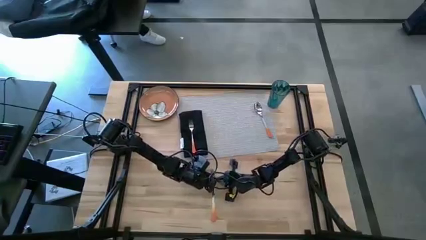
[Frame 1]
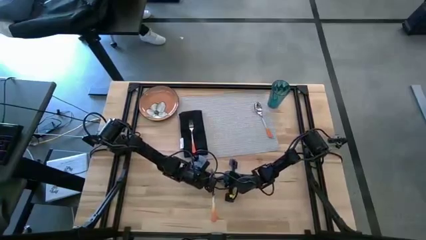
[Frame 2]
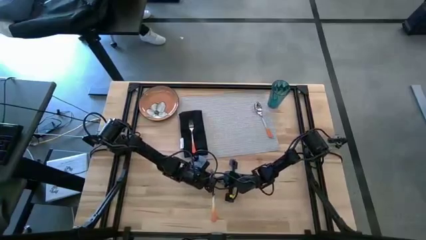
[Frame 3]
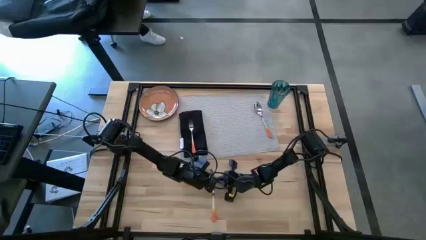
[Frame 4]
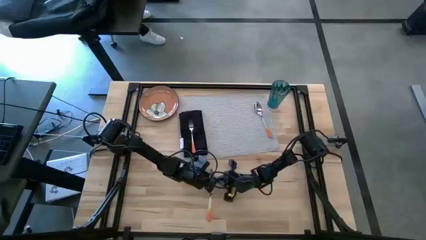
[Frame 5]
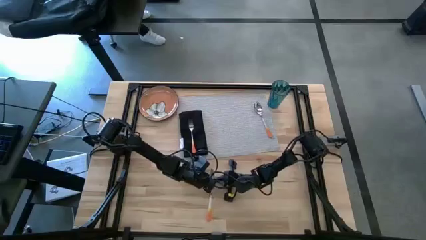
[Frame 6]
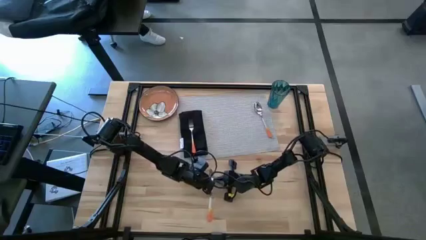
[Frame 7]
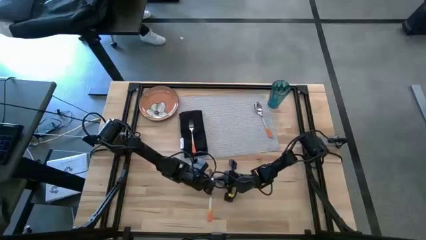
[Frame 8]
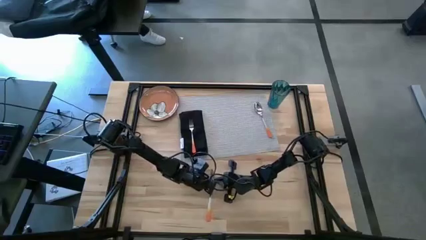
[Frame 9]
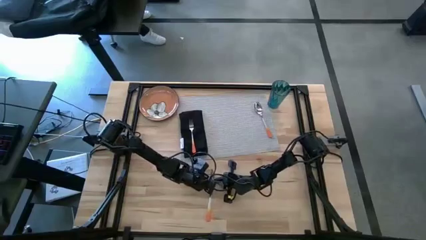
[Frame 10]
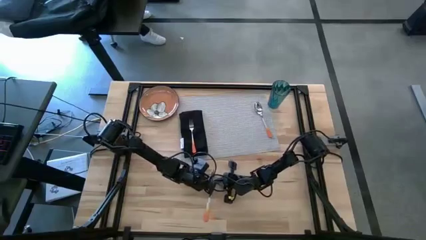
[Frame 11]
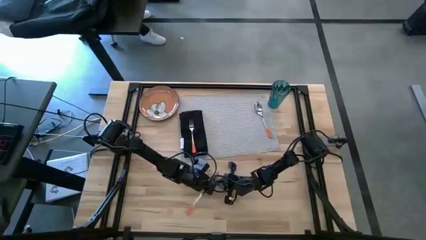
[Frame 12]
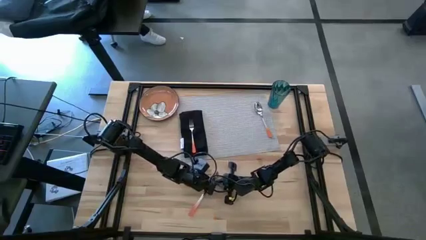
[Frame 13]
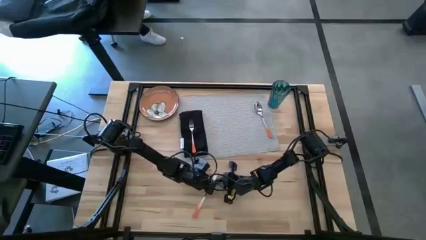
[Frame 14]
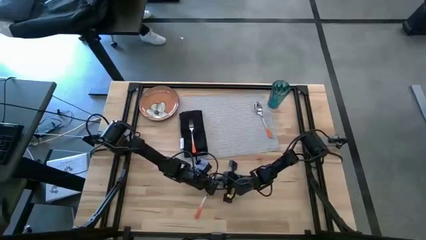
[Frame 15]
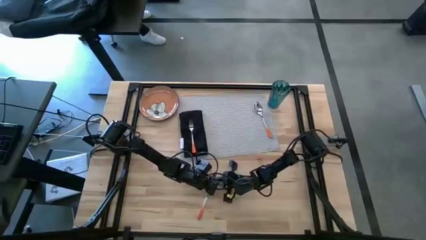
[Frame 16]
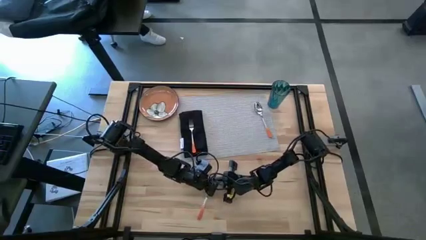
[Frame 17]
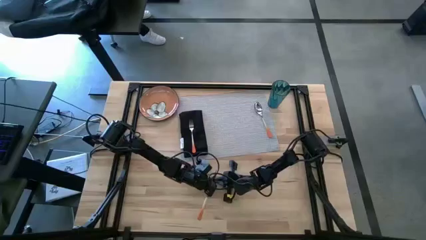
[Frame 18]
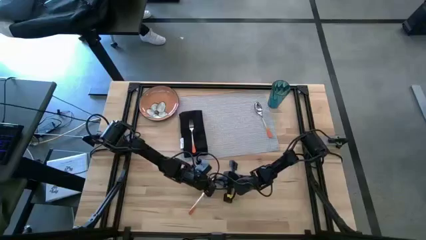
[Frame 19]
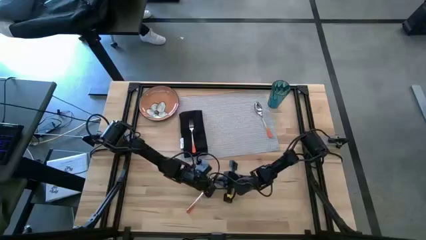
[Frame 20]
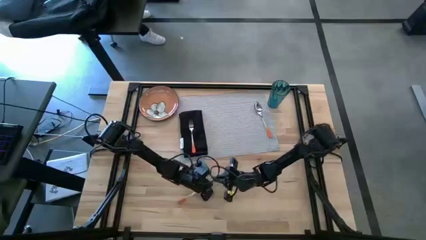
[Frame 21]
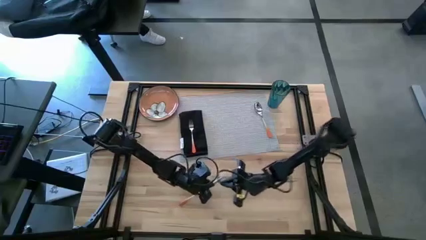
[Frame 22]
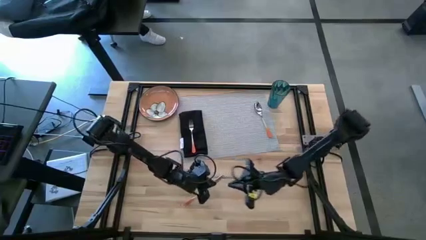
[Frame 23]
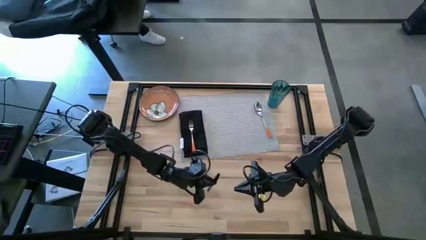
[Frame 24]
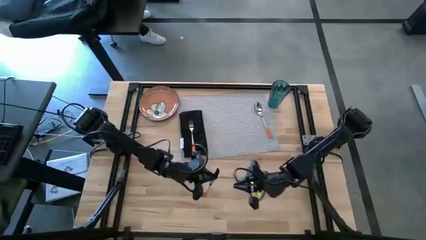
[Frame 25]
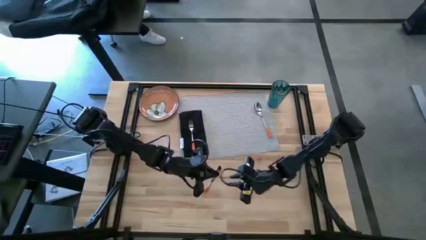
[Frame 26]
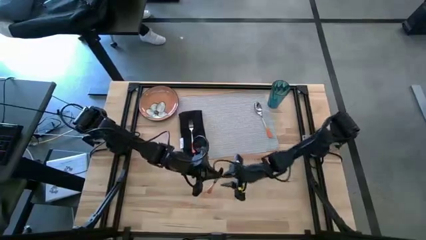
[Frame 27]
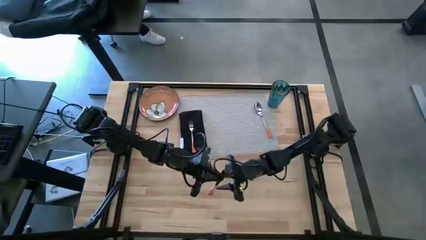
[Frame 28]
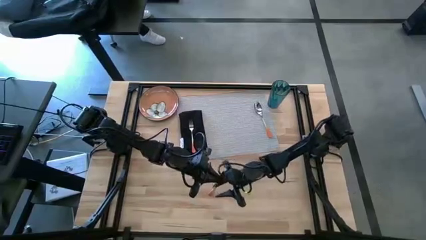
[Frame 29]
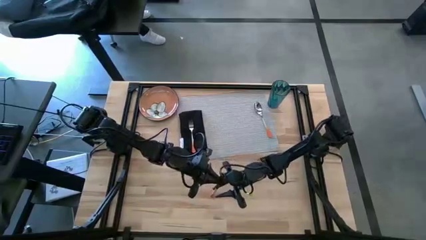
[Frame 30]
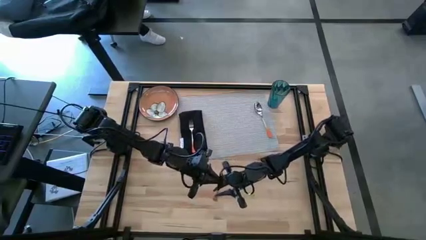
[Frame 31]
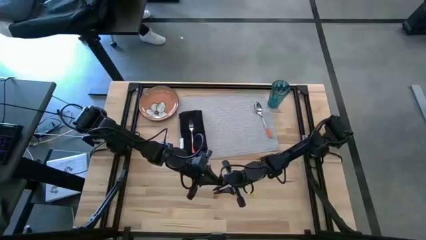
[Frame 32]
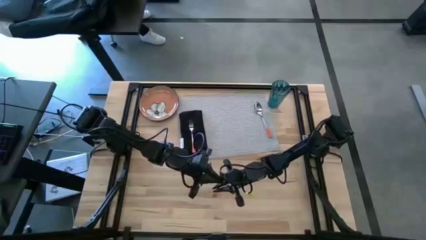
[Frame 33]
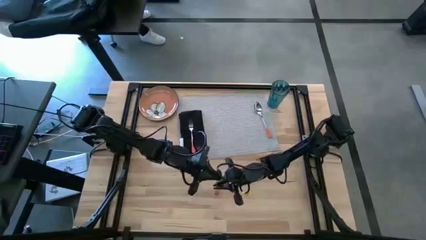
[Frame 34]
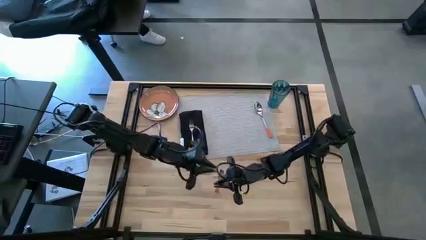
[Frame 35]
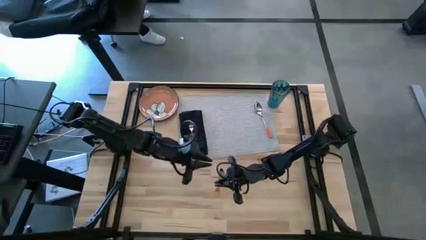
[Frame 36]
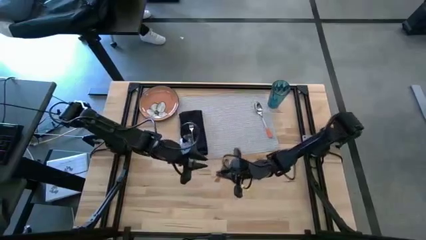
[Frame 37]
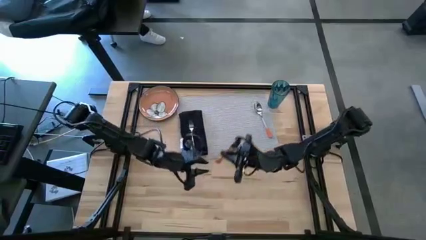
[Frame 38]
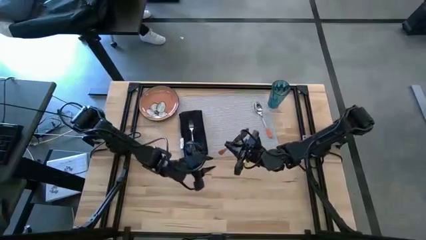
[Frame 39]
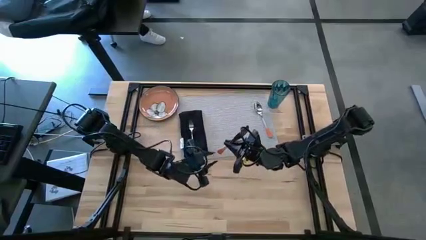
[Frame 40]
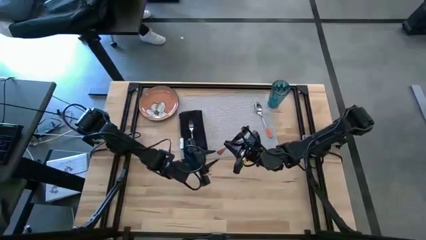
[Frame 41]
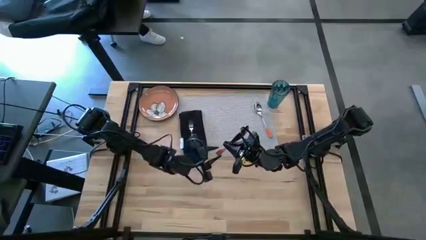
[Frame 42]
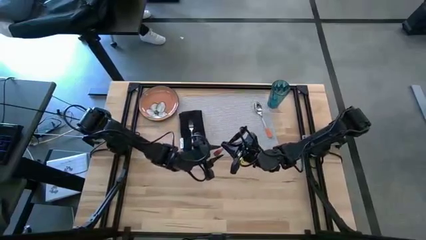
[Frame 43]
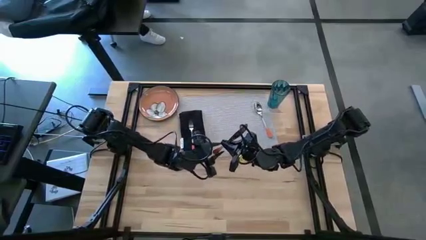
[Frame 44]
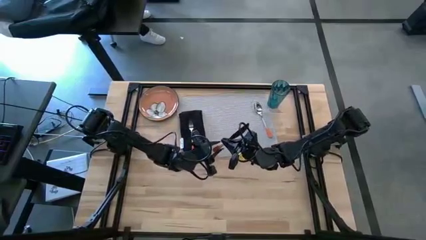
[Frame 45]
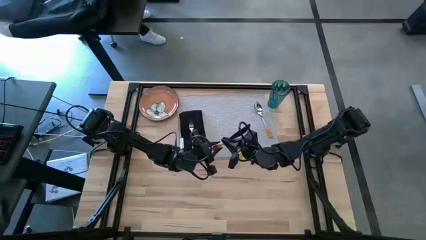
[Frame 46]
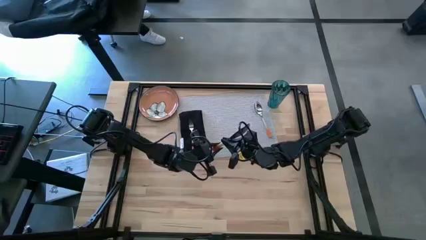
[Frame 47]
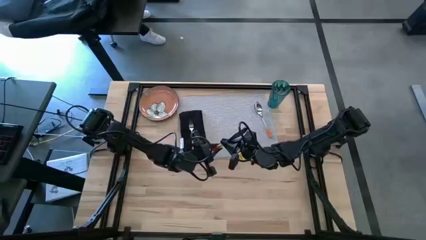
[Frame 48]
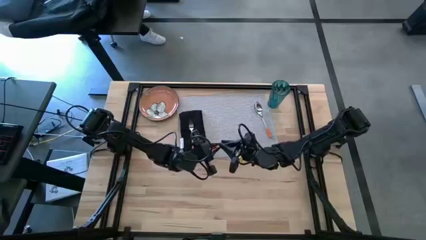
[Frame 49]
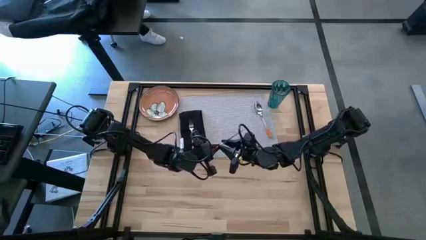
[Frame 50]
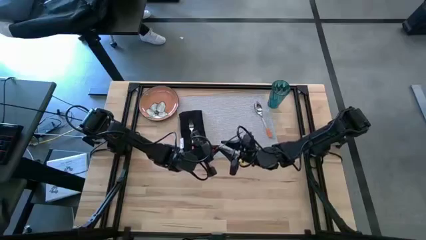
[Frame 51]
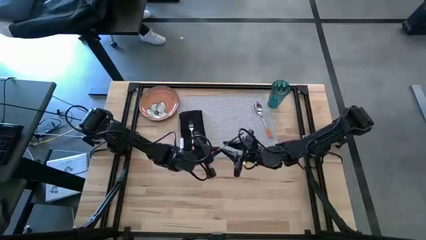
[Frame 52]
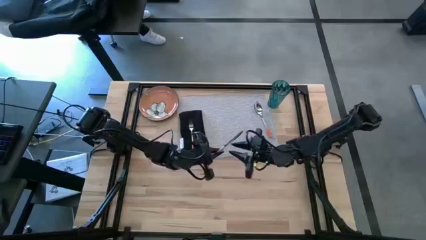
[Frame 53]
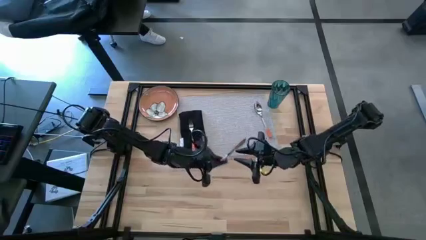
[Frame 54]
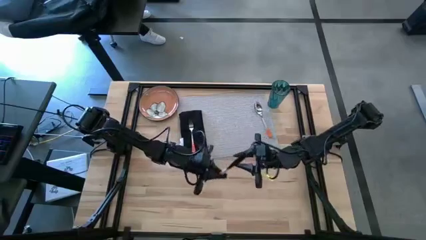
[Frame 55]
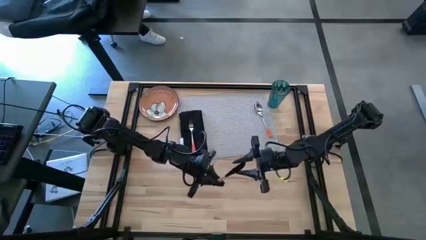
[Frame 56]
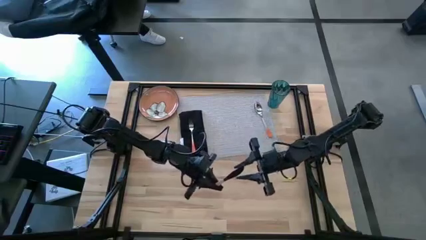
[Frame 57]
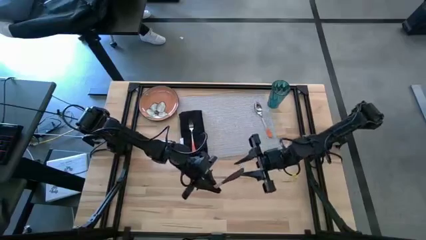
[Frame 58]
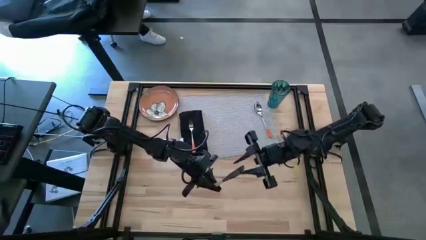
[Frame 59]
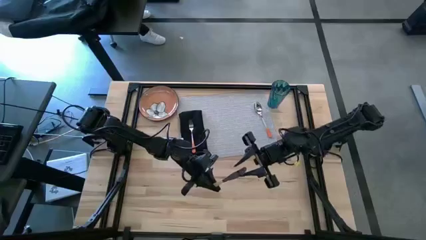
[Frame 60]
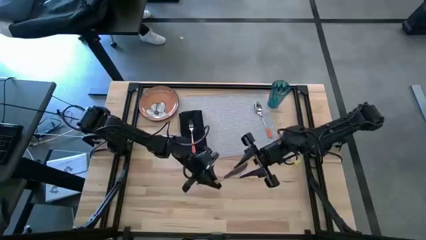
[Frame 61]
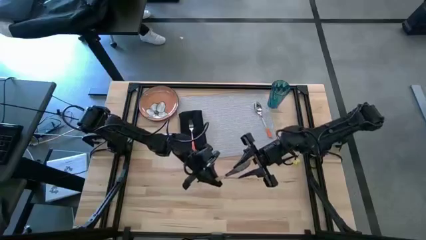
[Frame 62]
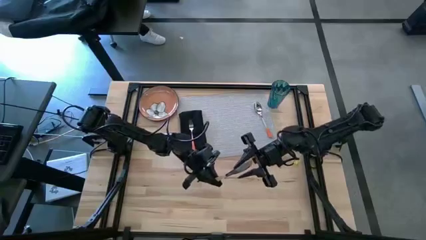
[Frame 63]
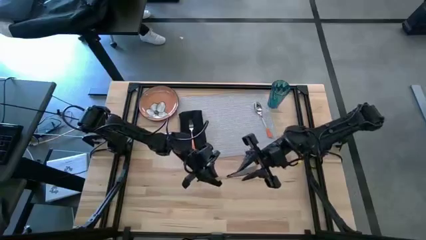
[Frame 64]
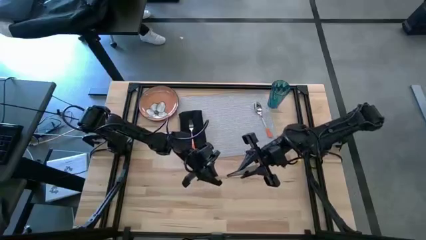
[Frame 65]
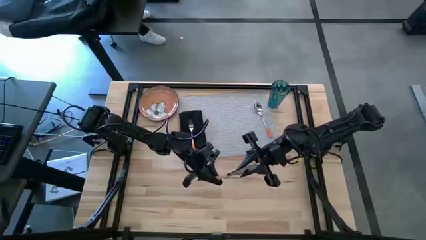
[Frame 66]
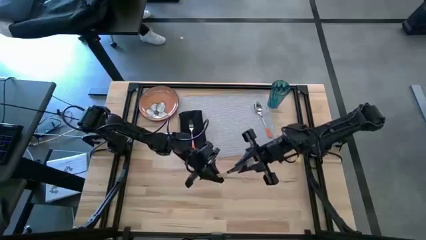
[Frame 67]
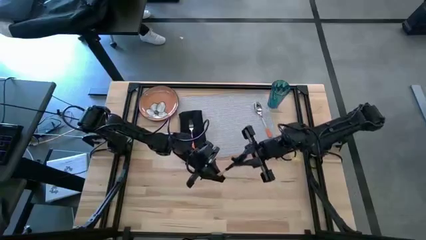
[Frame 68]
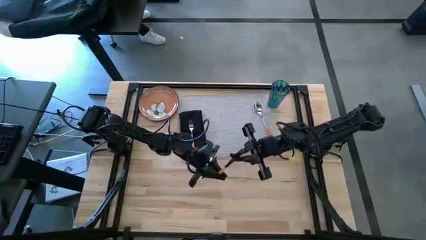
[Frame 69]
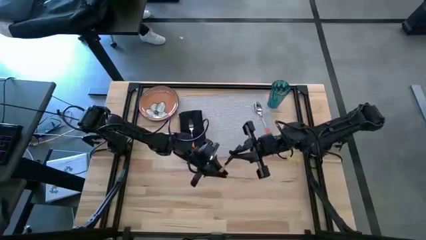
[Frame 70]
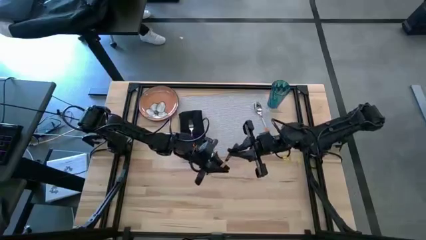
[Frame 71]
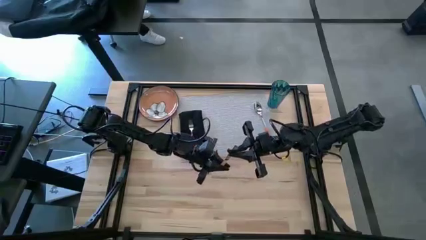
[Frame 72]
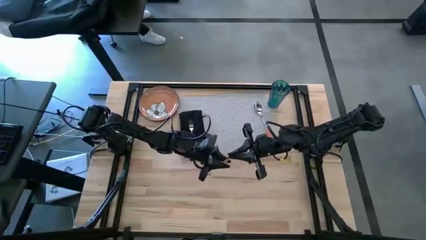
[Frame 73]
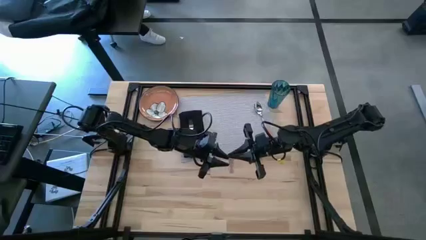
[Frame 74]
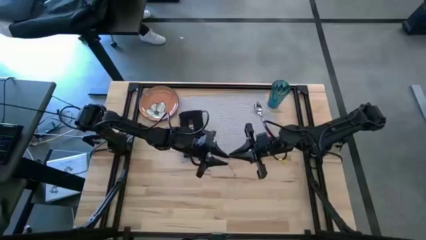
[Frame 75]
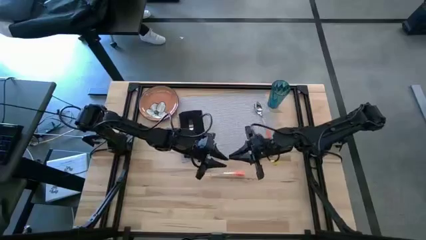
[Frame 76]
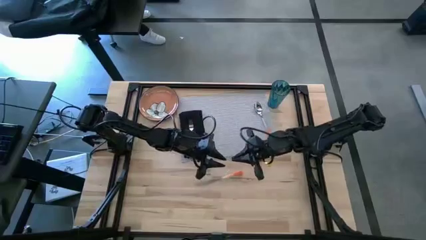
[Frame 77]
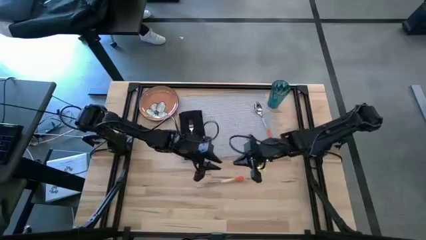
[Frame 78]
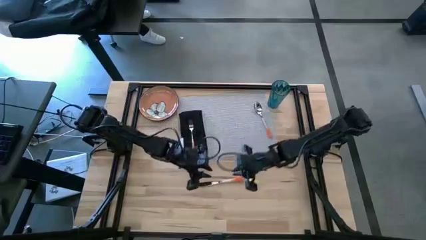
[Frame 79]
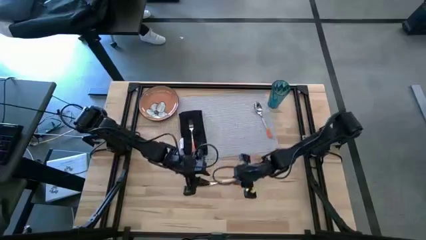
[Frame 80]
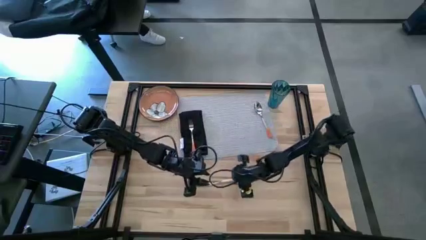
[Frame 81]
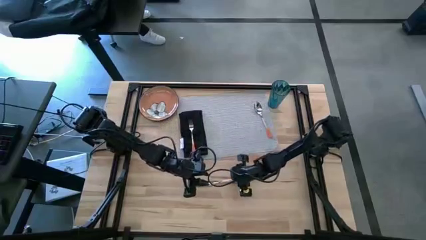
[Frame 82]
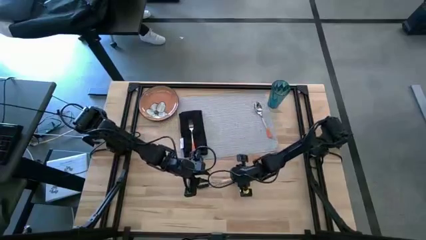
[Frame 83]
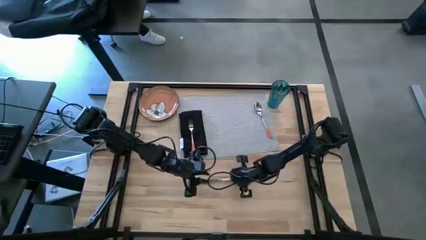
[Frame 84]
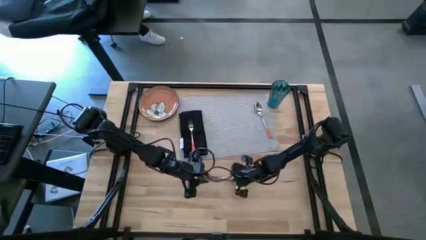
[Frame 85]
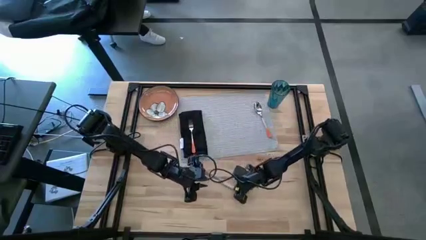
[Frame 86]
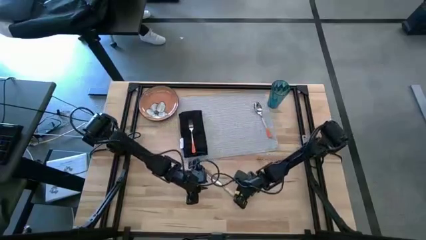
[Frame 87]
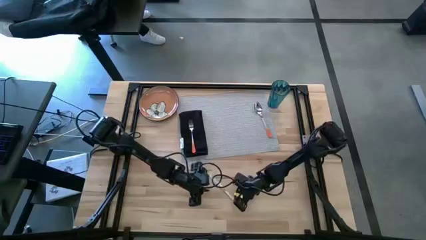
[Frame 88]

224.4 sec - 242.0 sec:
Task: Set table place
Put the orange table knife on the gray table mat beside the orange spoon
